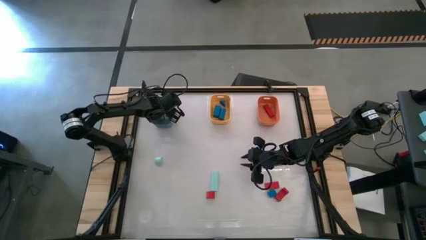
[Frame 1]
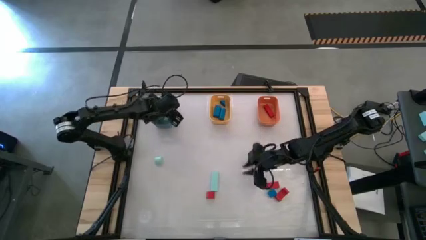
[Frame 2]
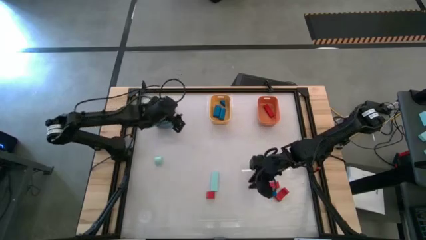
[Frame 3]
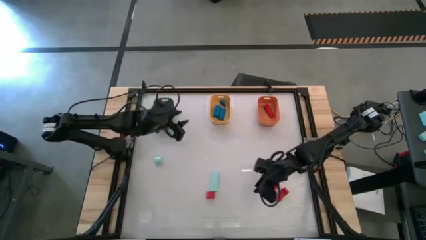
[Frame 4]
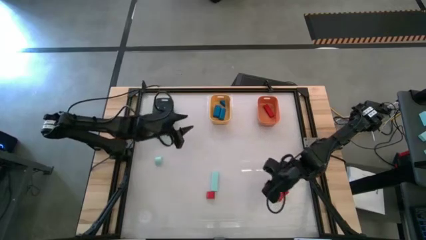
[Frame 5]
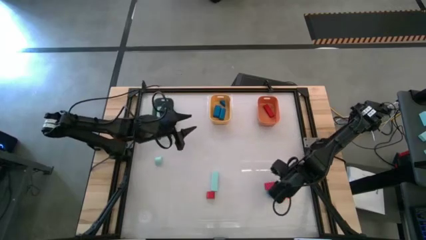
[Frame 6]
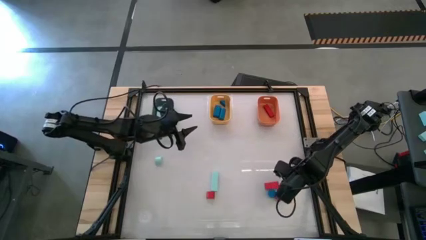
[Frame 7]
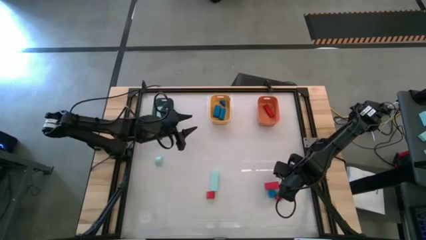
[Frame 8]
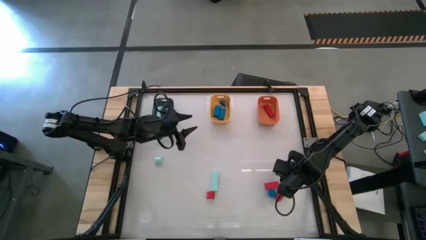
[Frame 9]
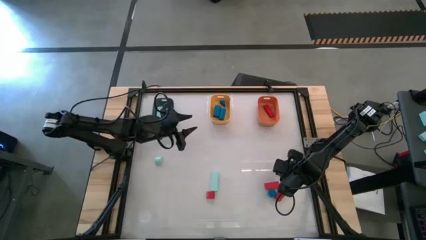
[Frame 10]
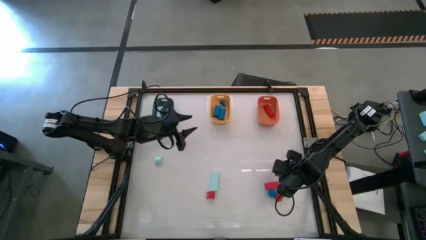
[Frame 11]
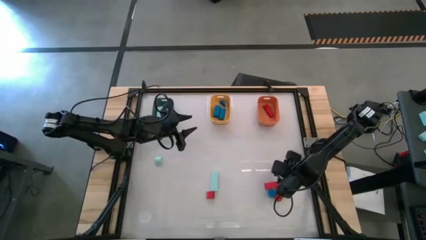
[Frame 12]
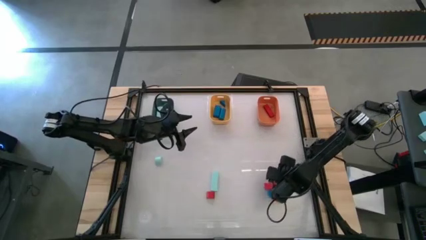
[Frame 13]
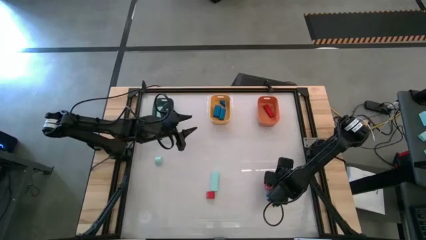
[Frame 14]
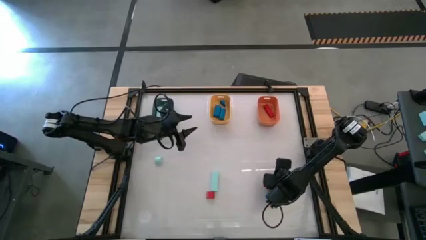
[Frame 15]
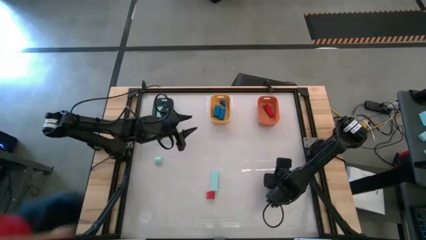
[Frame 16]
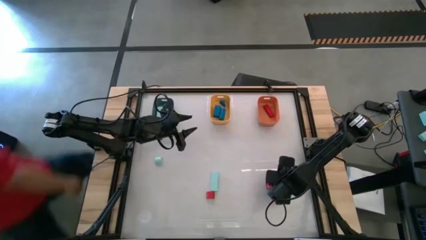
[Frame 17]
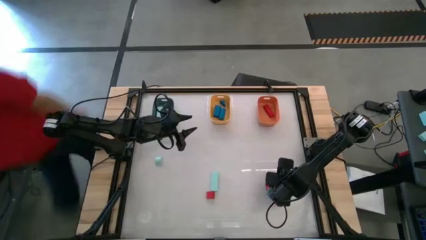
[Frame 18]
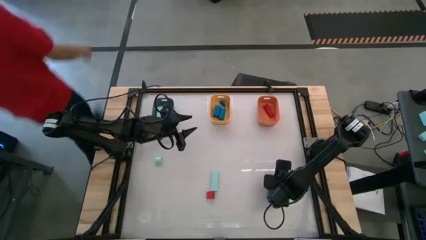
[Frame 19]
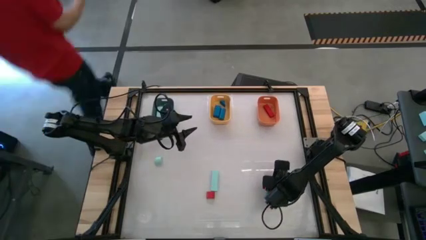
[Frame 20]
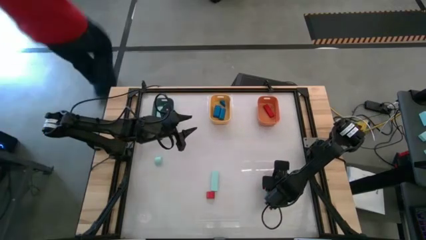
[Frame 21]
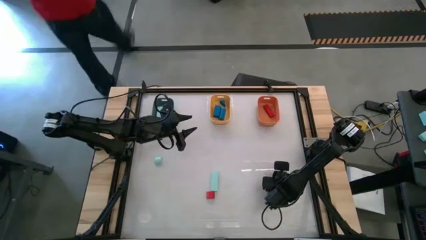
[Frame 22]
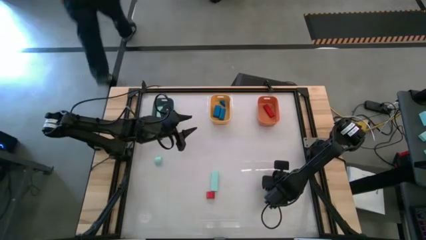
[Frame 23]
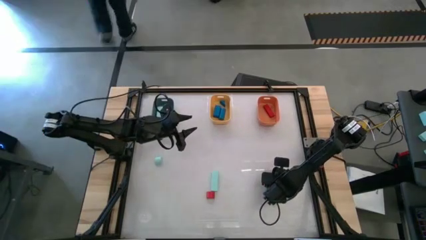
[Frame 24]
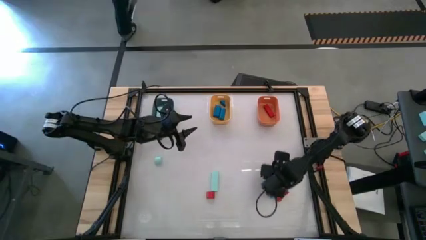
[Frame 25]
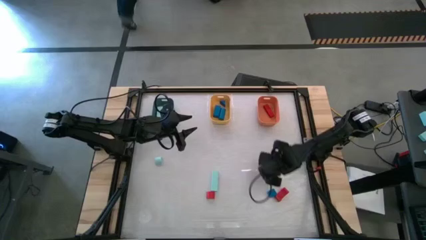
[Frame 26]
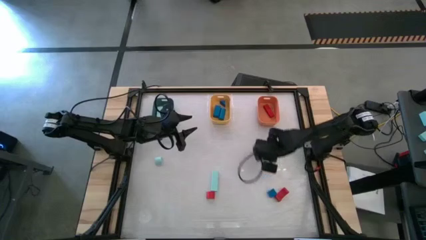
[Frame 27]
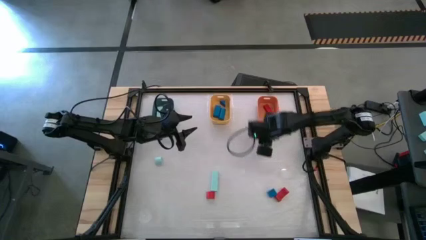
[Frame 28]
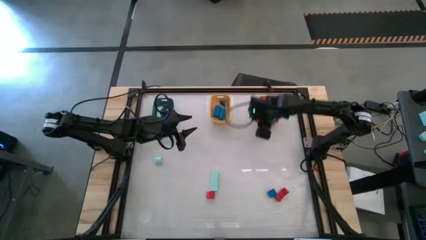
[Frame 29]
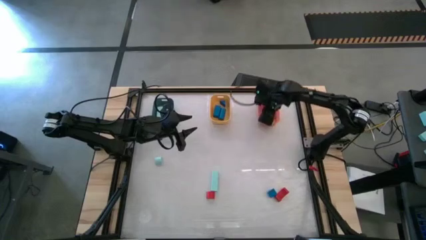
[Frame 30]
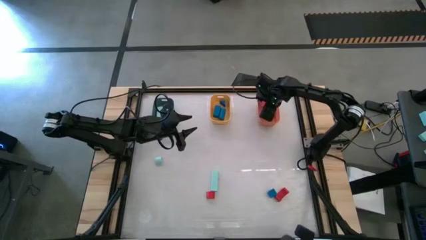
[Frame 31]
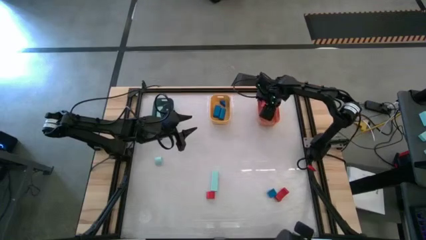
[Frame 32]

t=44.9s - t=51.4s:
Task: Sort & place blocks by color
Put the red block into the orange bin

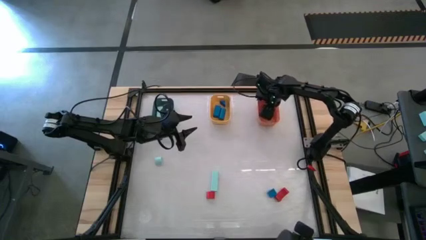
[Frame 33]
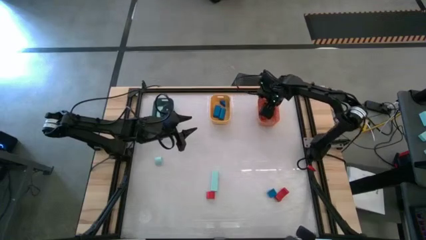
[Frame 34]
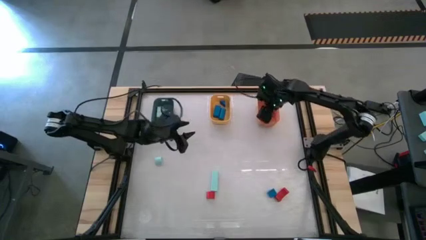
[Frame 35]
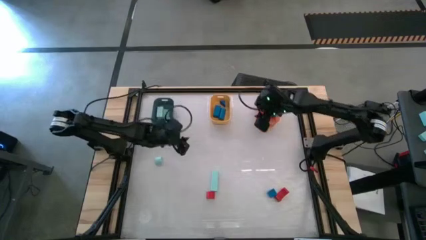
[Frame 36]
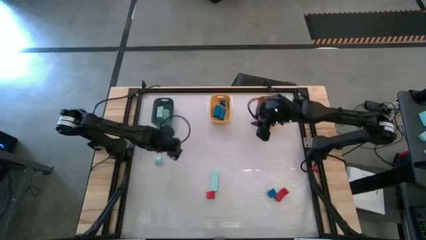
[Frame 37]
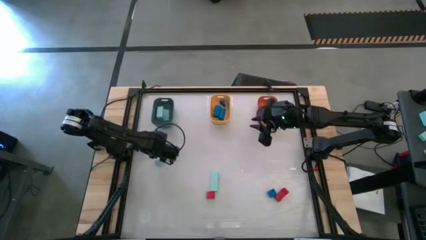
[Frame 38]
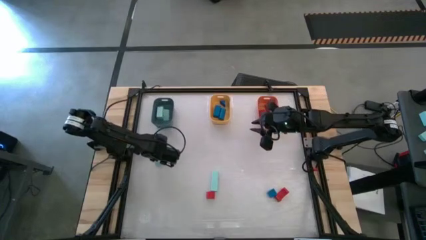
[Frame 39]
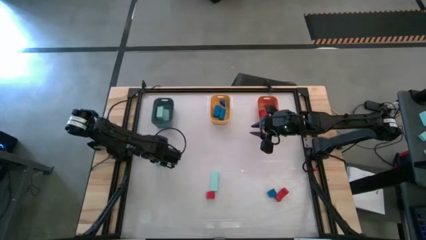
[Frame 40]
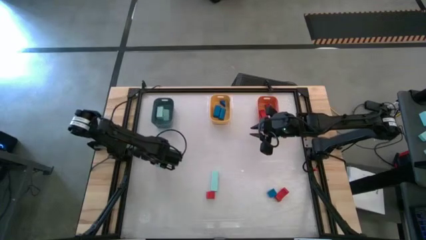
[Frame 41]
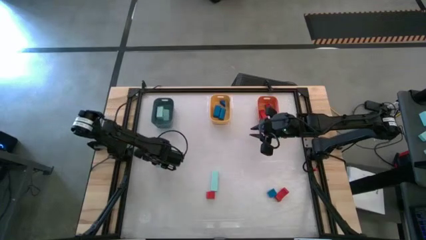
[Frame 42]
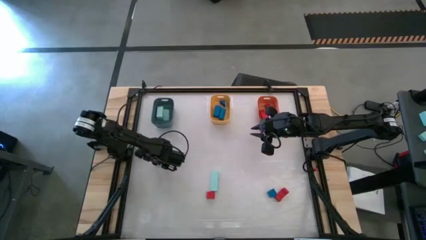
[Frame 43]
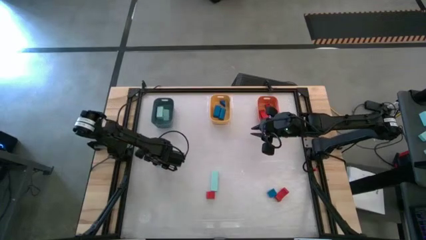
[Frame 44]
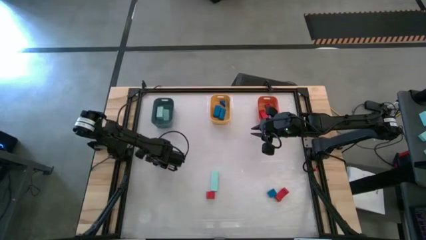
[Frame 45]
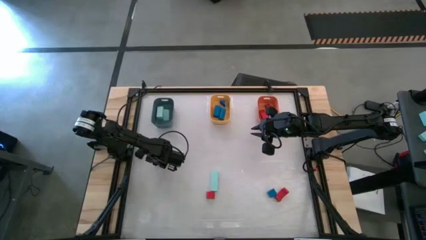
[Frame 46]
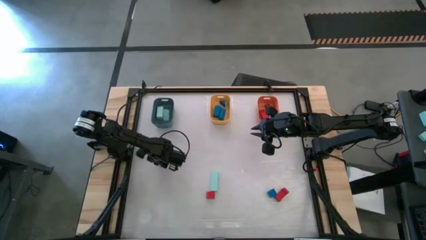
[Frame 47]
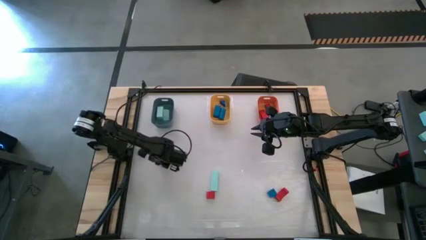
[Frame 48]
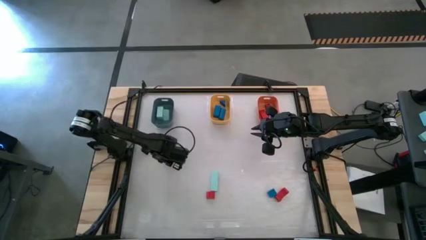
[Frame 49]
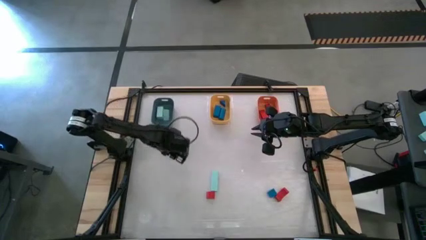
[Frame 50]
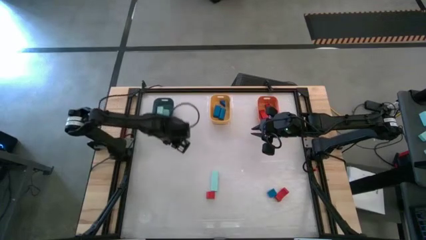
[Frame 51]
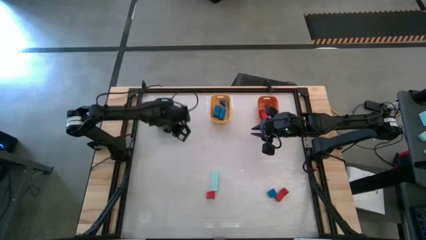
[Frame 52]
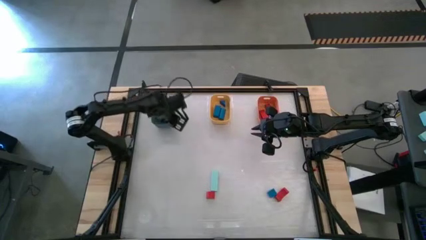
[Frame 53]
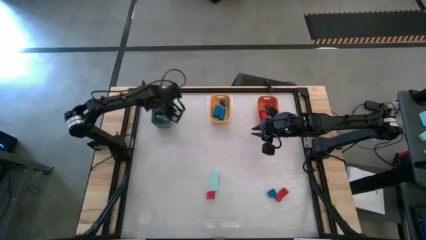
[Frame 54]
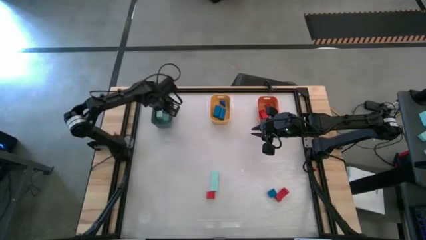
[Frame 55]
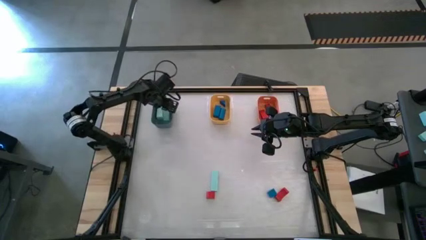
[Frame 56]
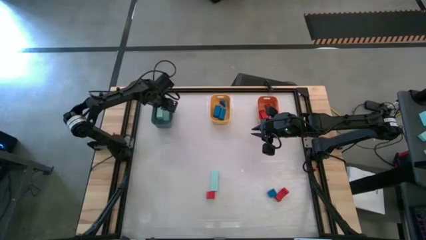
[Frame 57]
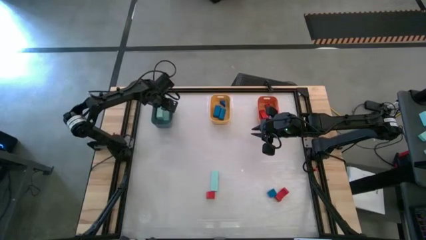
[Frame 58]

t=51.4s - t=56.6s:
Put the light blue block into the green bin

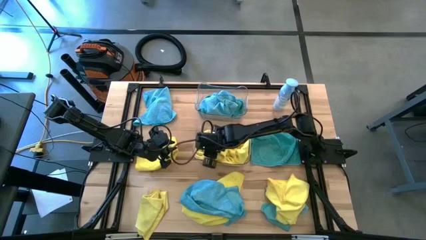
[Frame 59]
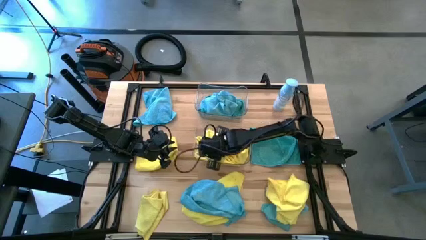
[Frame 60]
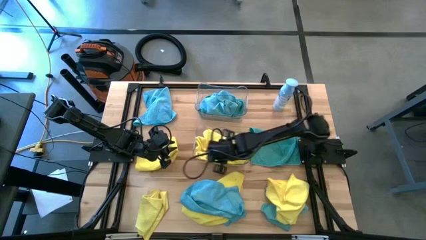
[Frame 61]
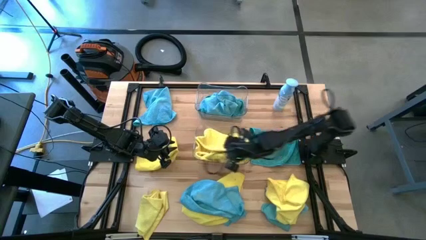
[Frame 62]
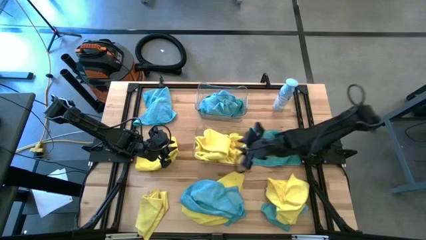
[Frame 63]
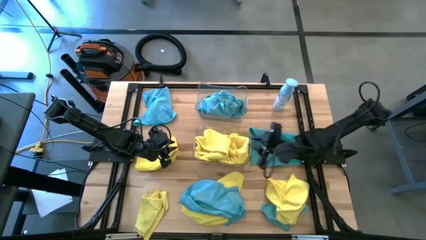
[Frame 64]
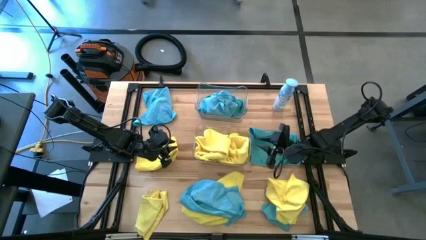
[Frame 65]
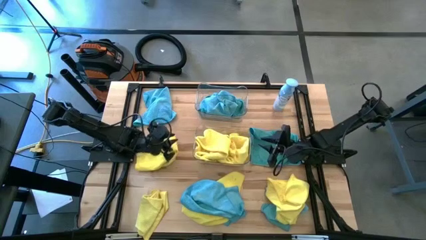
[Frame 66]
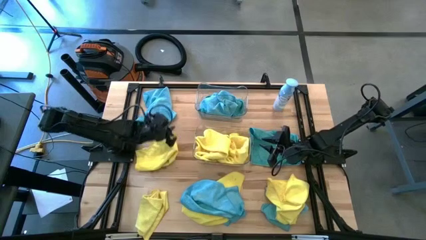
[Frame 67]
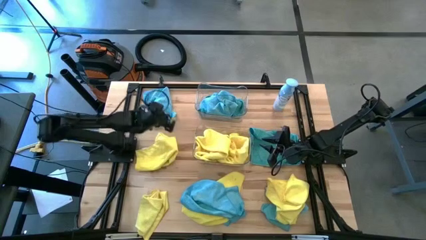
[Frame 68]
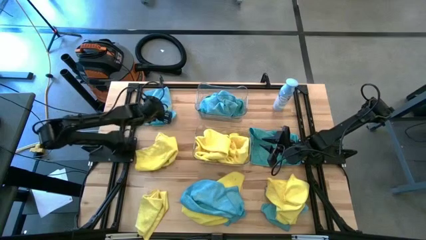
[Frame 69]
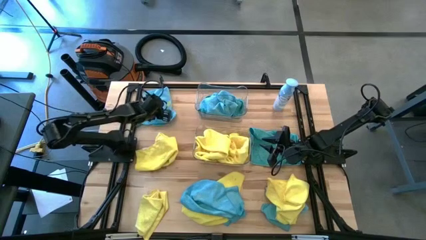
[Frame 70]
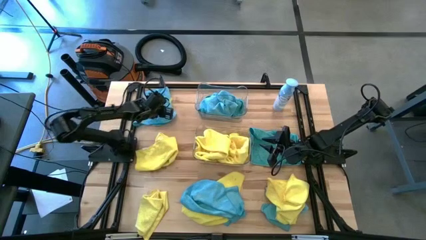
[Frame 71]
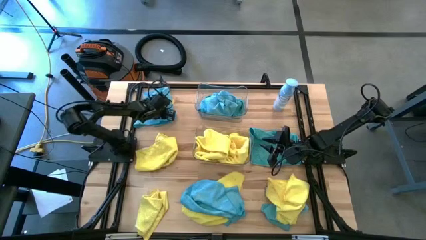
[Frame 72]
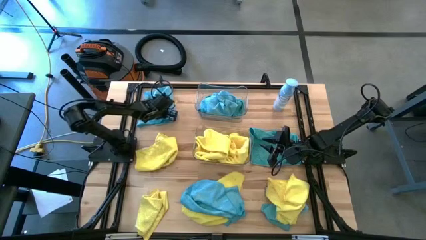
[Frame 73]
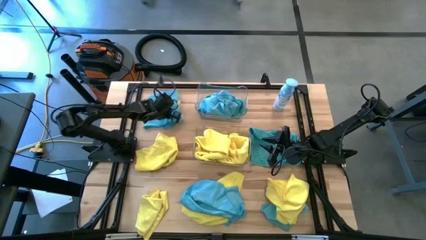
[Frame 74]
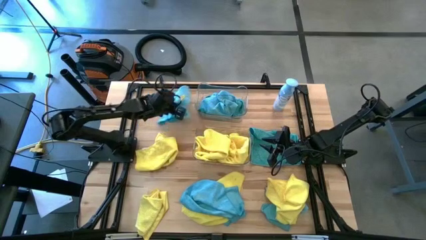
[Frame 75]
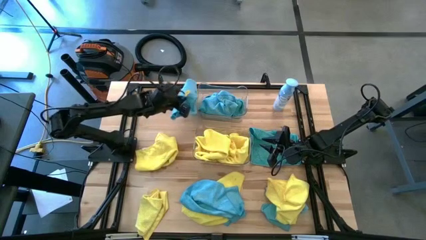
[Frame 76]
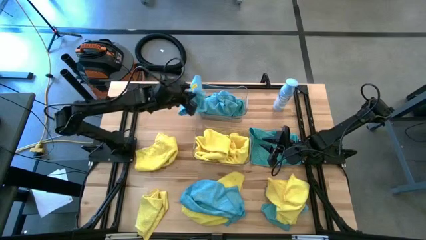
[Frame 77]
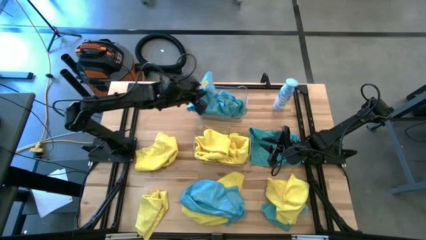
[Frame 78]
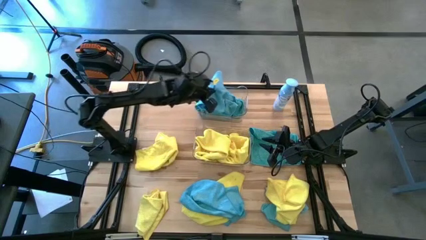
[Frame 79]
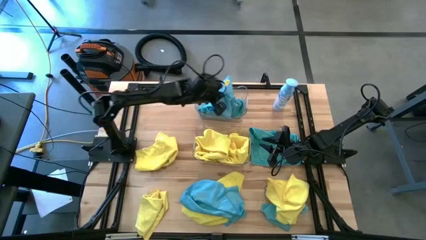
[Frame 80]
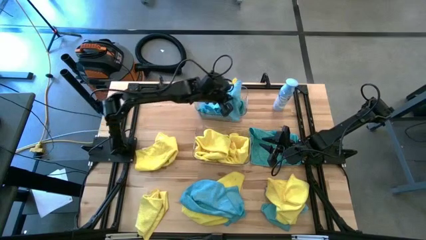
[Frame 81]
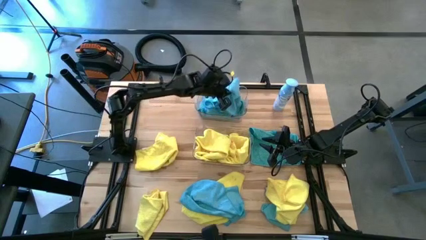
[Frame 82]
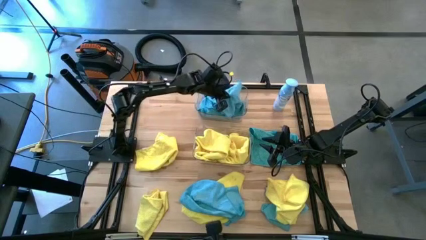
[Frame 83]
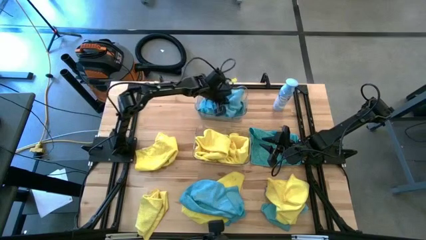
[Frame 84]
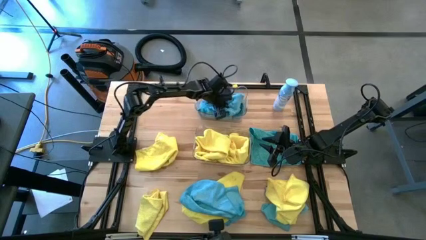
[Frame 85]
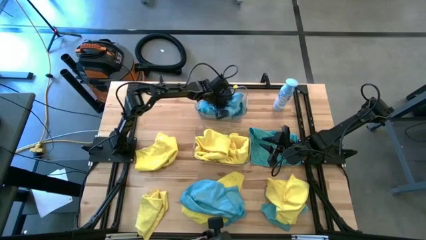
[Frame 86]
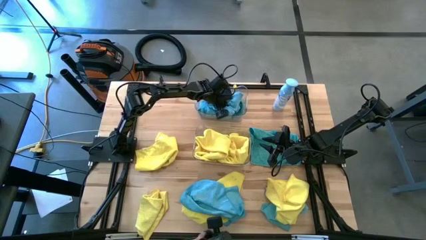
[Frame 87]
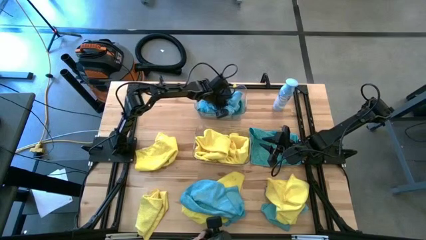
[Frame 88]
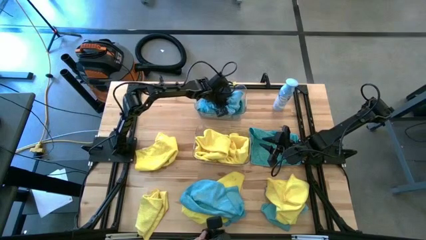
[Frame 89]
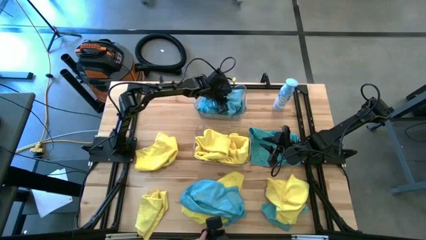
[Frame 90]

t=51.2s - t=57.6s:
Task: Sort microfiber towel by color & place in baskets
Put the blue towel into the top transparent bin
